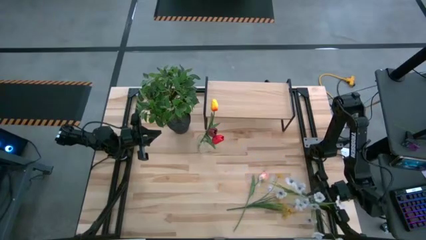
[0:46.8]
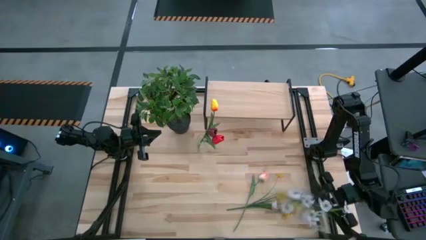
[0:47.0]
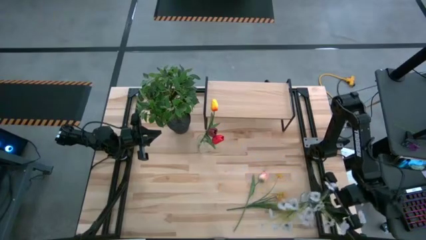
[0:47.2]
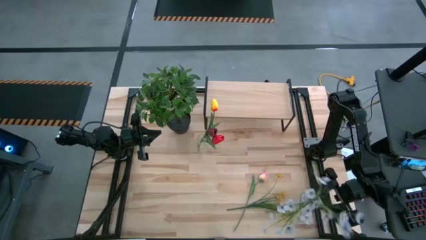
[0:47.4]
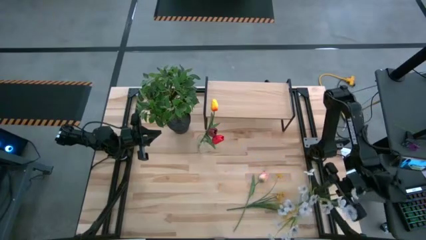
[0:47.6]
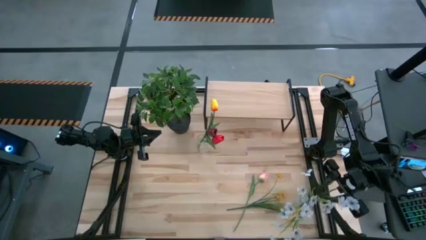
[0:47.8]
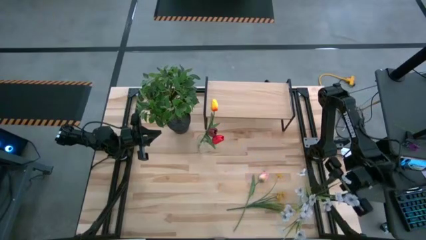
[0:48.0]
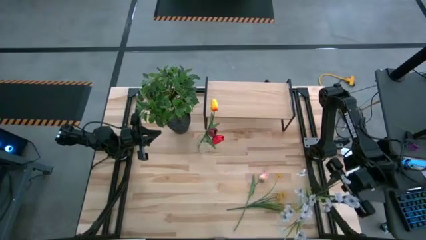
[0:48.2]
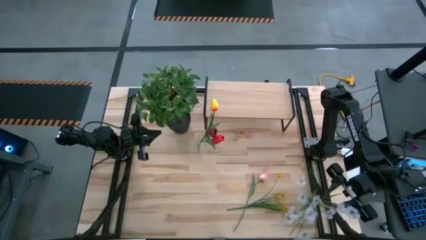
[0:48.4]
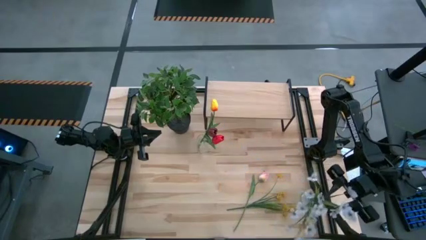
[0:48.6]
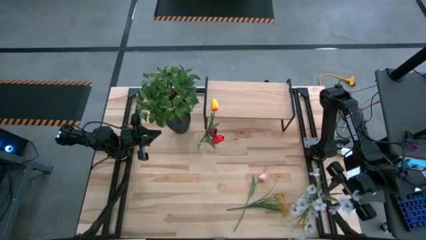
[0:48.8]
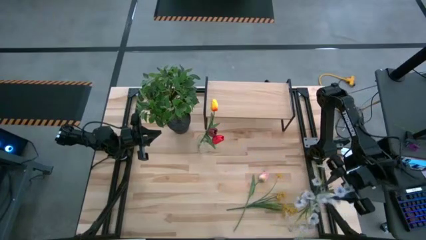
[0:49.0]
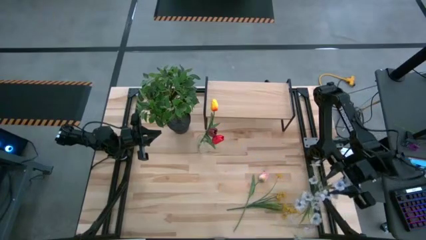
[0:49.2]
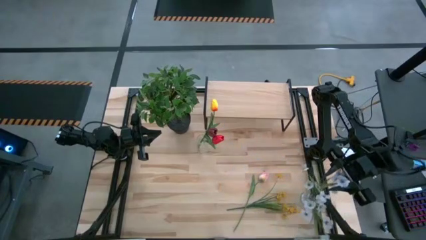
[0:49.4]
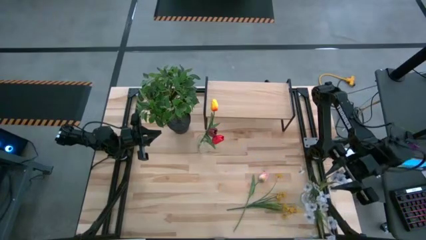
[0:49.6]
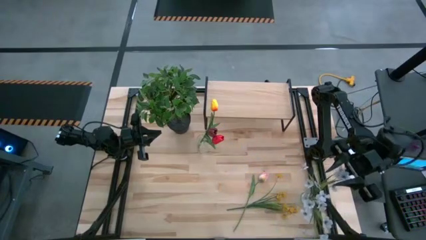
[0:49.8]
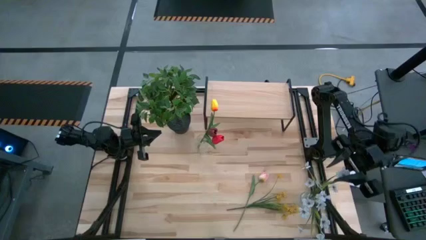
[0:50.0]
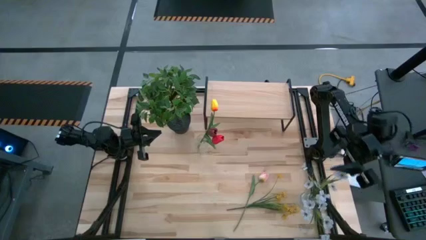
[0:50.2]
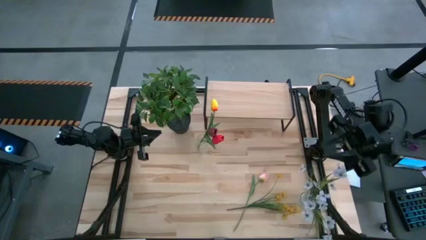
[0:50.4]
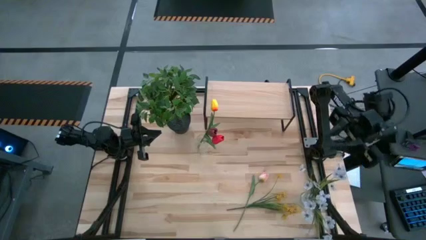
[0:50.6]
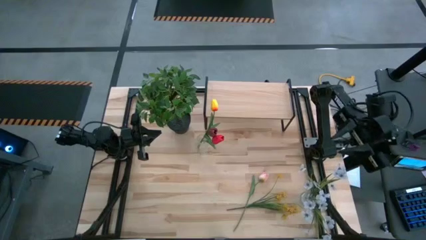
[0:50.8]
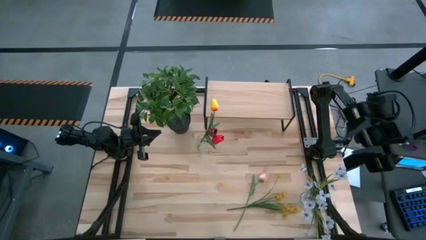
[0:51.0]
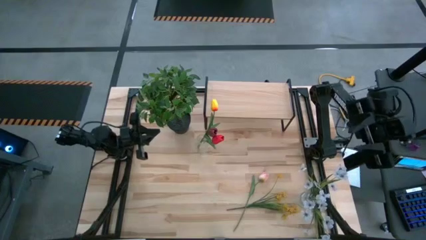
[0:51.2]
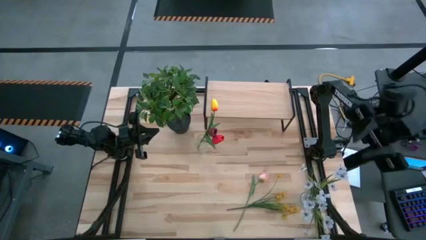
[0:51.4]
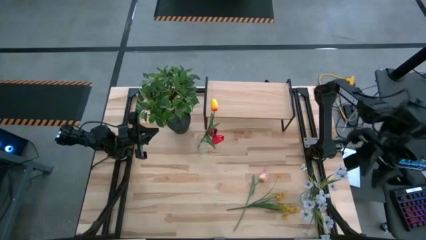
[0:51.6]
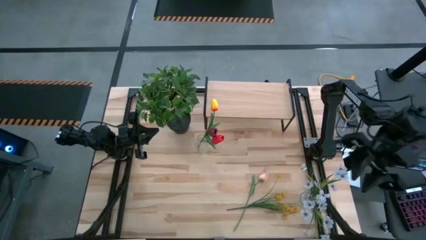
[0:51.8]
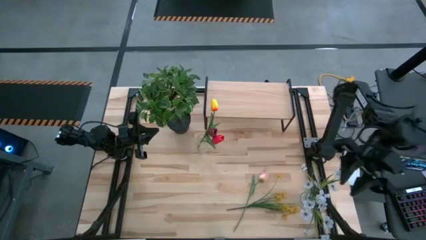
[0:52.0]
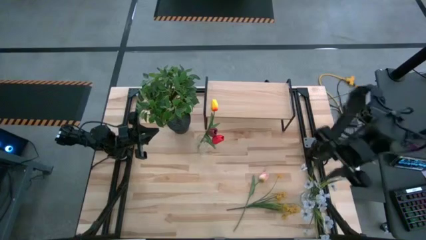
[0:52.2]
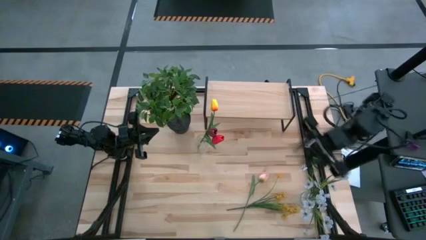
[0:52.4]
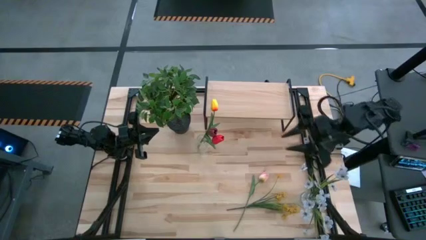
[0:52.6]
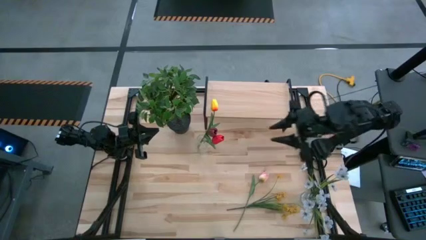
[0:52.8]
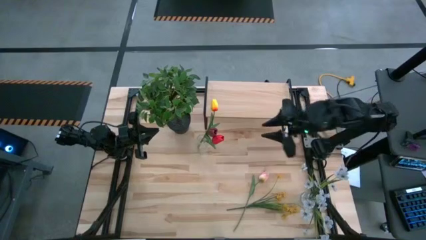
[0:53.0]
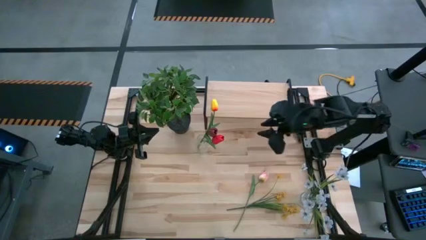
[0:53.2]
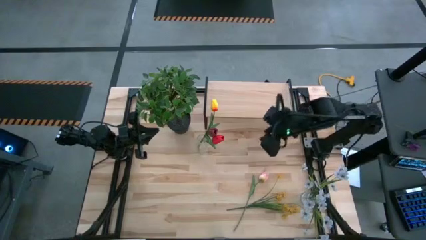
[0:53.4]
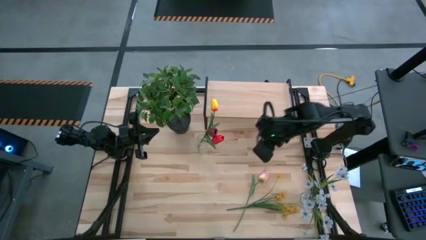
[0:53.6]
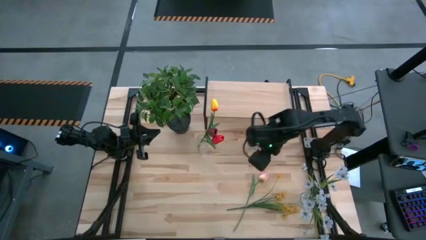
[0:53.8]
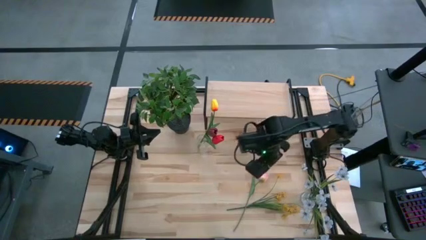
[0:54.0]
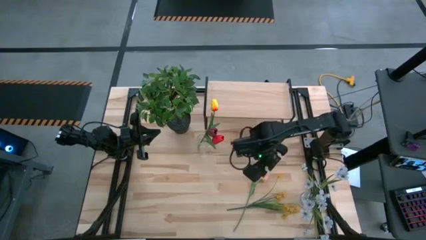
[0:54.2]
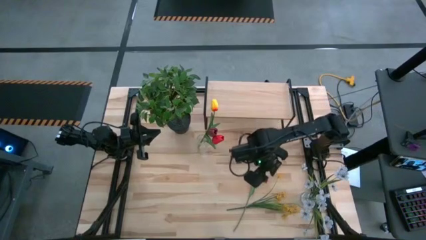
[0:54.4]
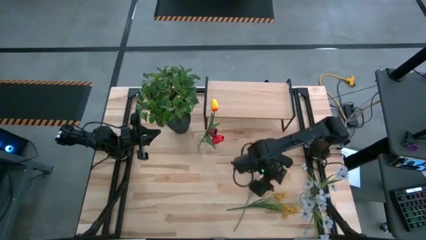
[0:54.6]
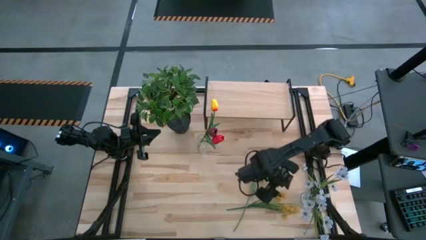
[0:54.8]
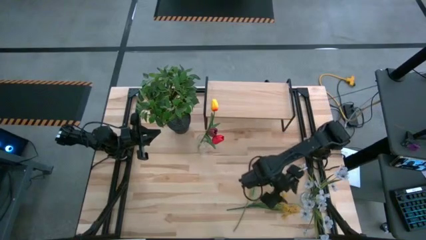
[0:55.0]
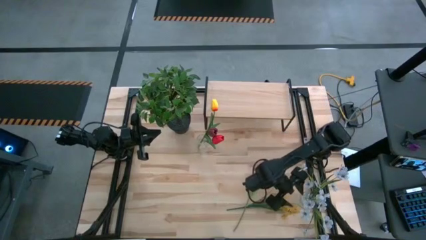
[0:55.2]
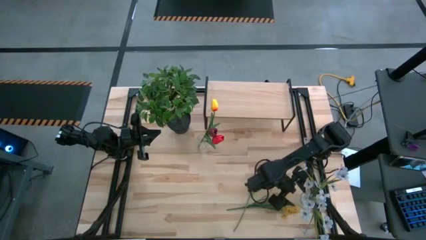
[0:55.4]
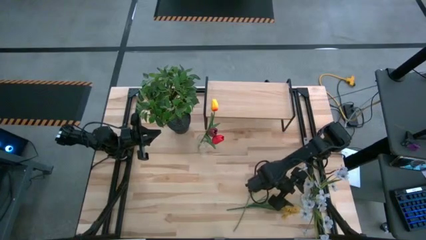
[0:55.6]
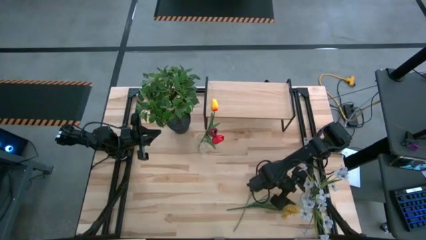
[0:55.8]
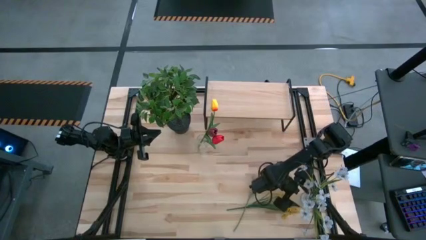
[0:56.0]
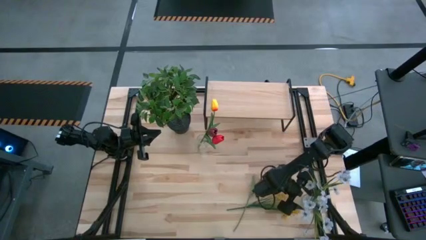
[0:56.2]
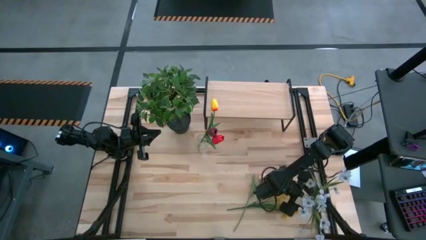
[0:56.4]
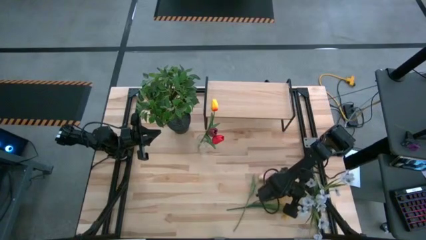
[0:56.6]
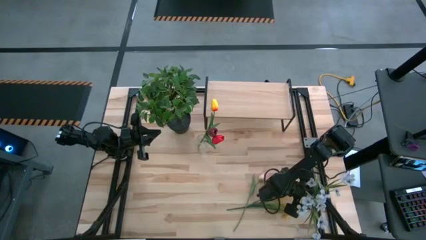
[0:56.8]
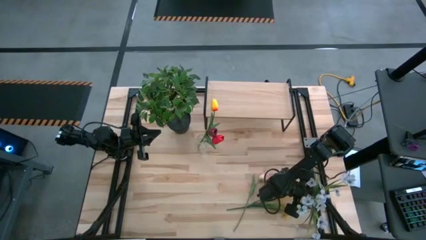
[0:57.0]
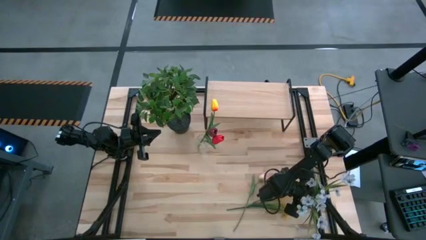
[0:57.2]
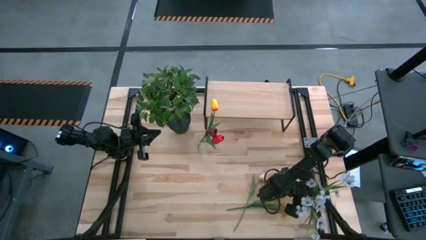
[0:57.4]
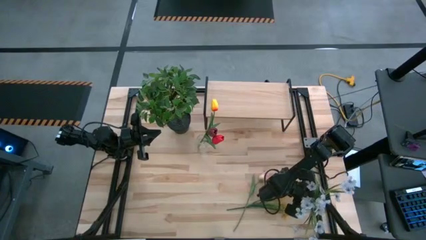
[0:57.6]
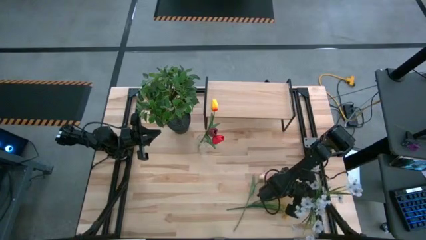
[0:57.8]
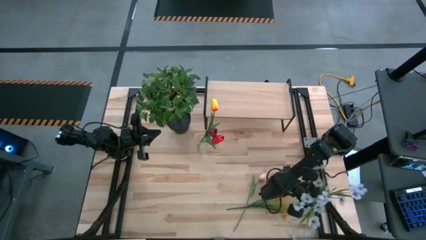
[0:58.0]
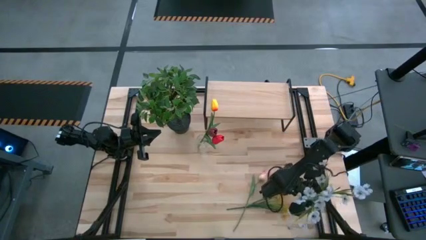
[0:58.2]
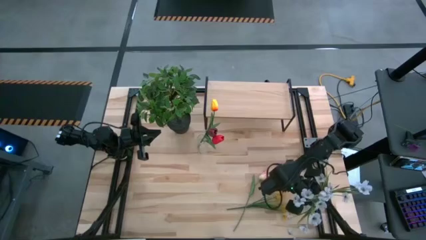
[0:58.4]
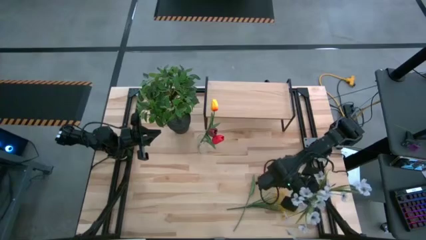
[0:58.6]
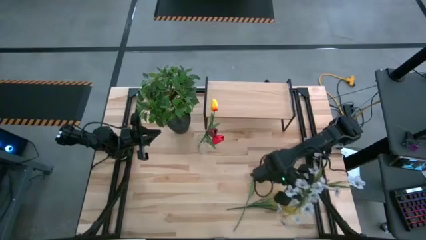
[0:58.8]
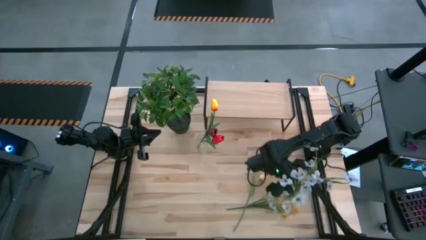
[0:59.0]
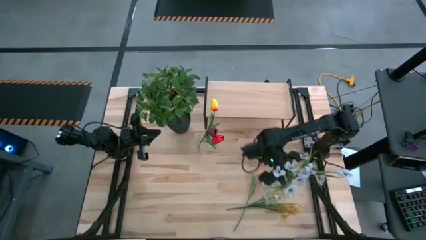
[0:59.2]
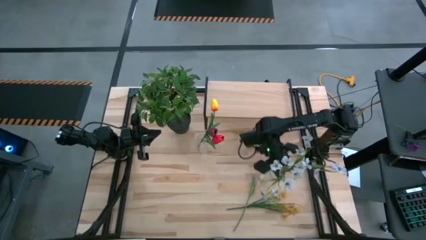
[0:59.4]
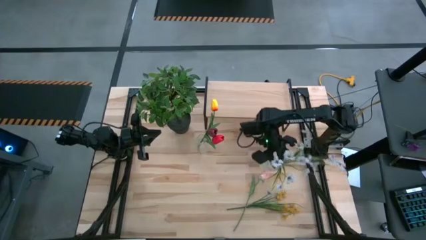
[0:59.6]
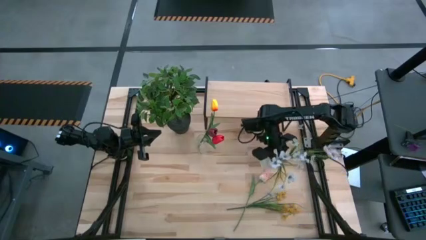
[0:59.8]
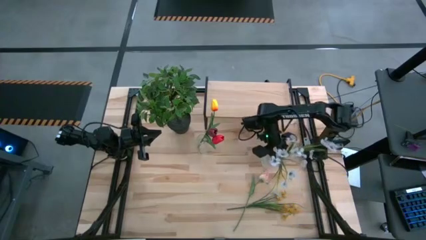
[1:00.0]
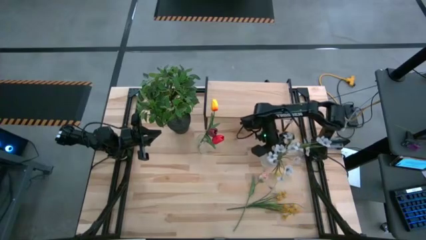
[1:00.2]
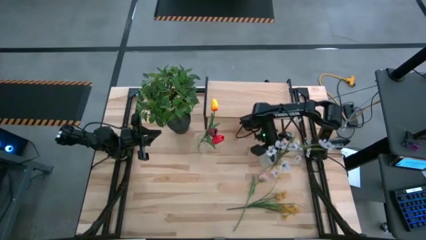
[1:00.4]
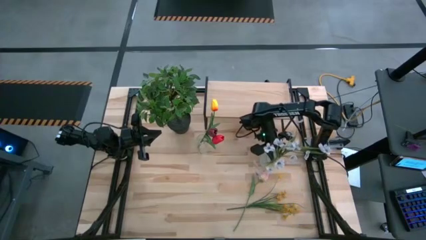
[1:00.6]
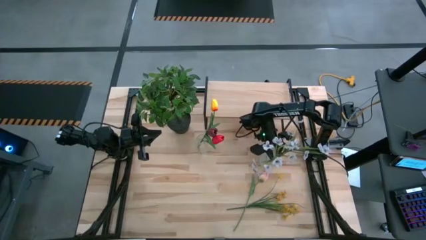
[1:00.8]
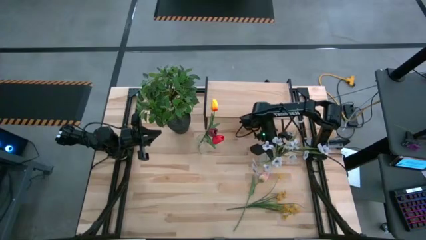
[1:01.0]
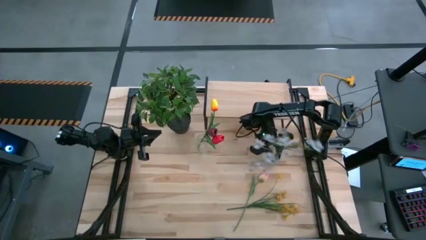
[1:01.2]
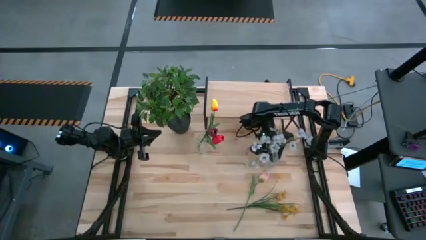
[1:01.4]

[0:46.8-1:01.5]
Task: Pick and place flowers into a vace then onto a shelf
Move the bottom transparent vase from bottom to middle right of the table
